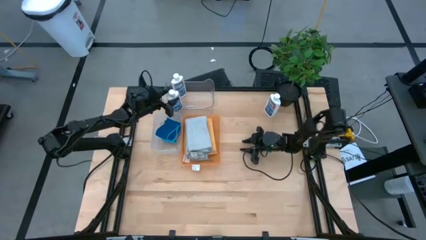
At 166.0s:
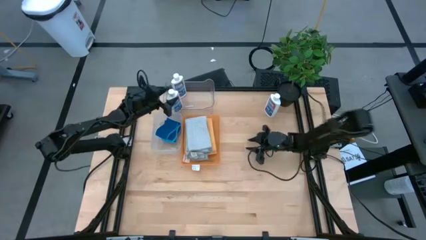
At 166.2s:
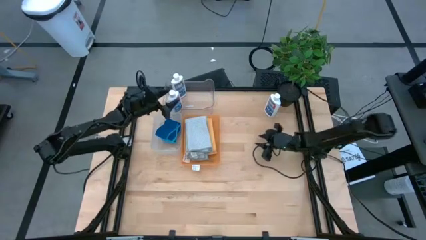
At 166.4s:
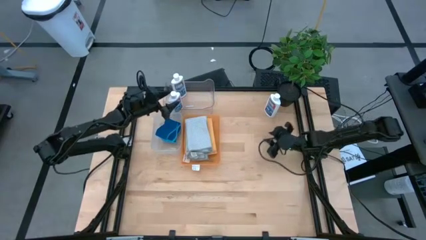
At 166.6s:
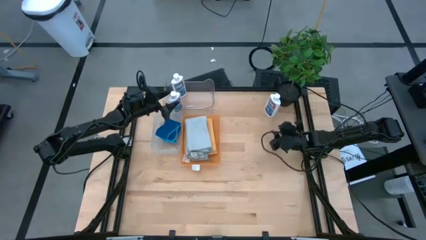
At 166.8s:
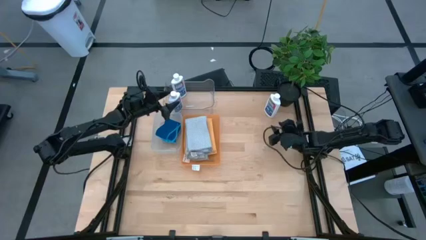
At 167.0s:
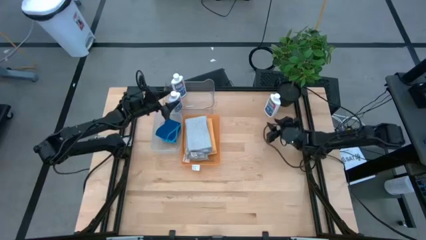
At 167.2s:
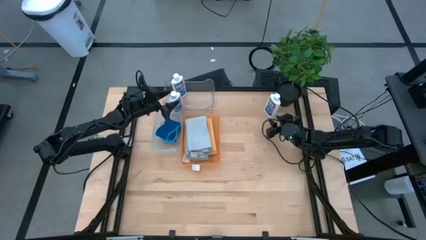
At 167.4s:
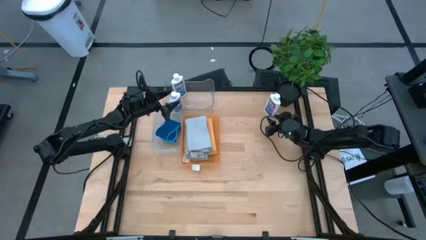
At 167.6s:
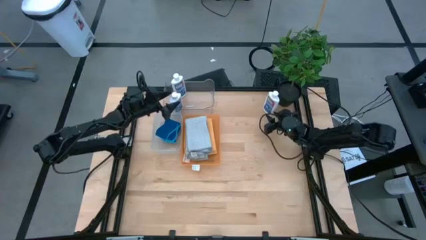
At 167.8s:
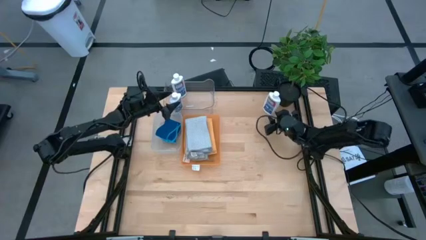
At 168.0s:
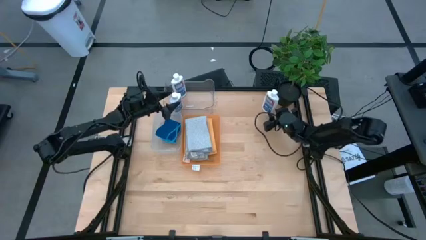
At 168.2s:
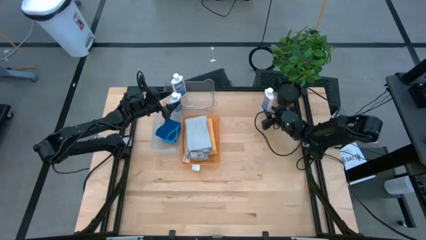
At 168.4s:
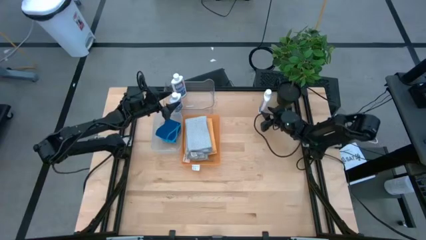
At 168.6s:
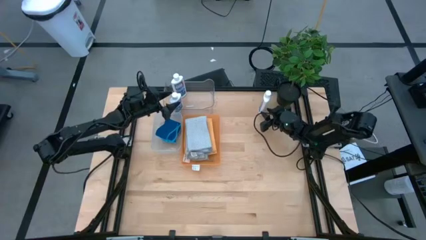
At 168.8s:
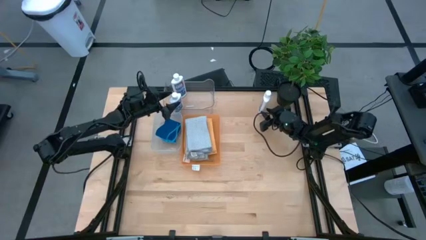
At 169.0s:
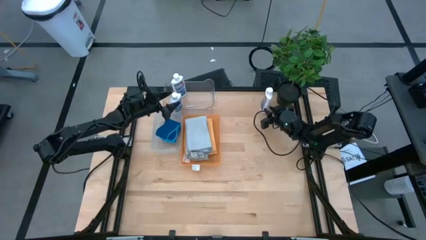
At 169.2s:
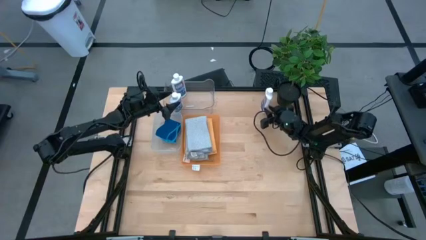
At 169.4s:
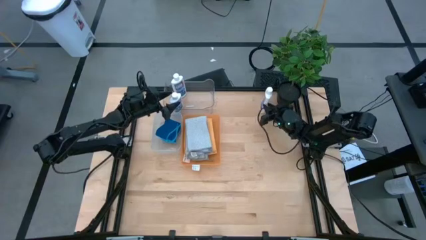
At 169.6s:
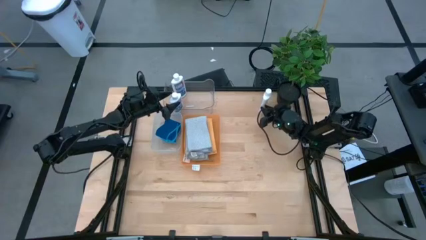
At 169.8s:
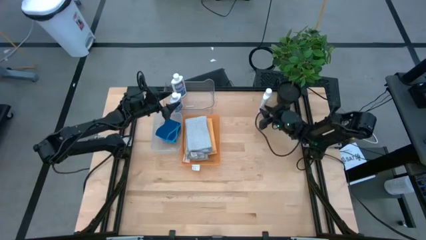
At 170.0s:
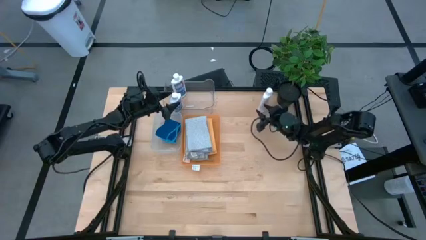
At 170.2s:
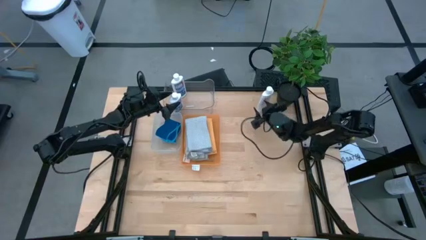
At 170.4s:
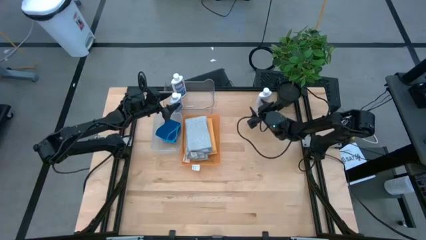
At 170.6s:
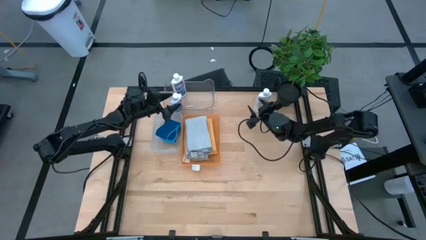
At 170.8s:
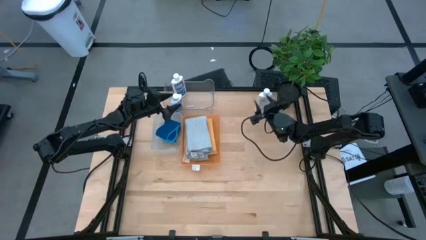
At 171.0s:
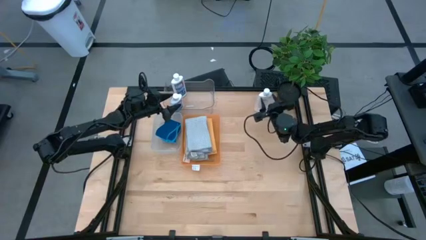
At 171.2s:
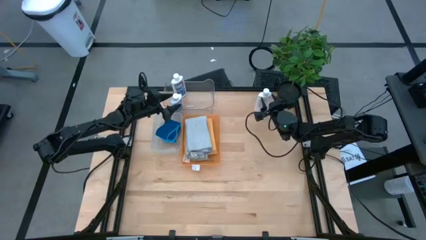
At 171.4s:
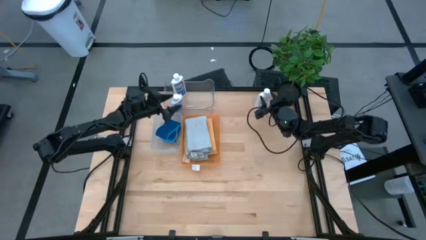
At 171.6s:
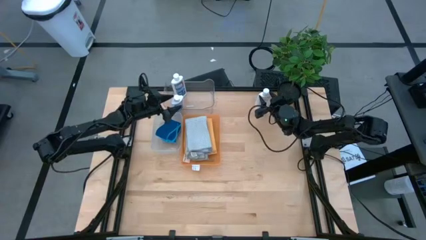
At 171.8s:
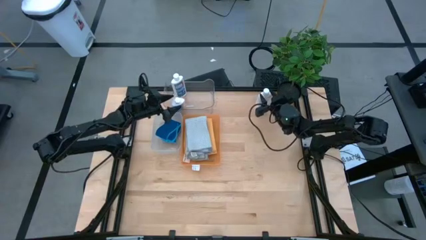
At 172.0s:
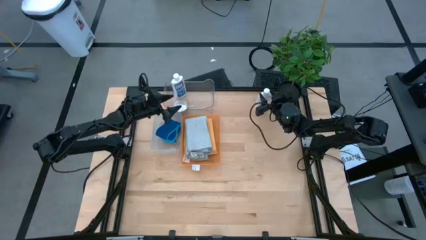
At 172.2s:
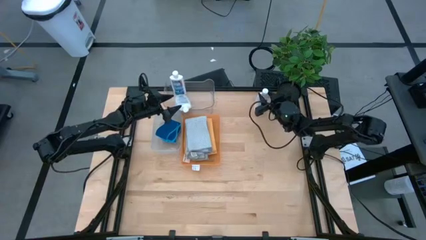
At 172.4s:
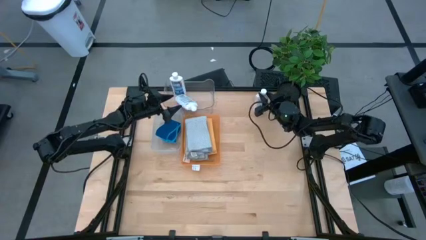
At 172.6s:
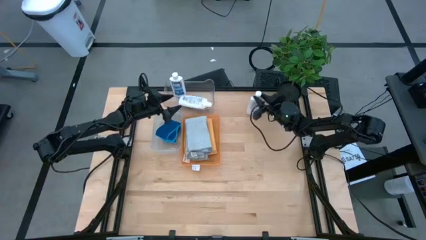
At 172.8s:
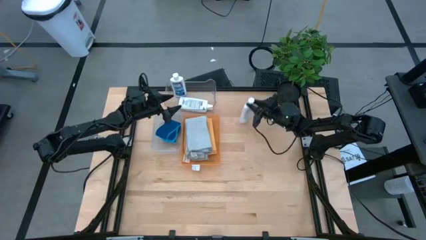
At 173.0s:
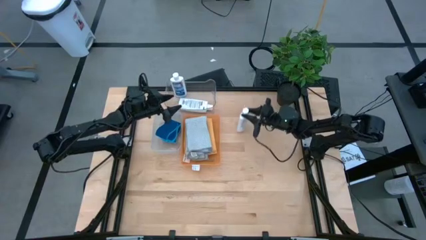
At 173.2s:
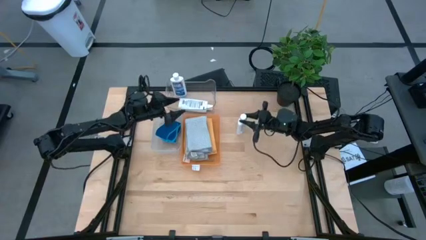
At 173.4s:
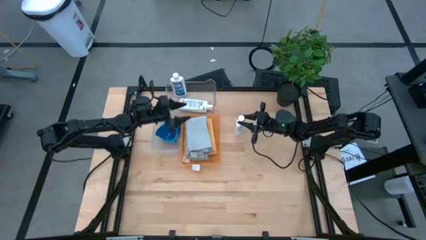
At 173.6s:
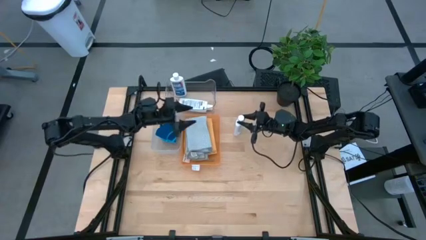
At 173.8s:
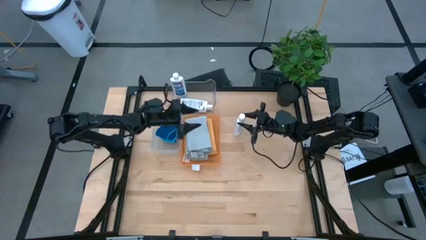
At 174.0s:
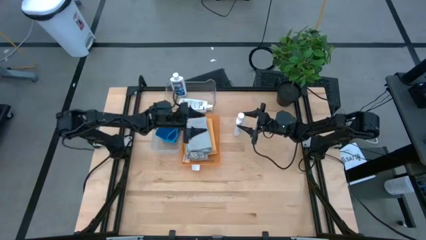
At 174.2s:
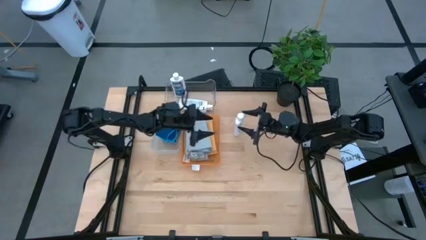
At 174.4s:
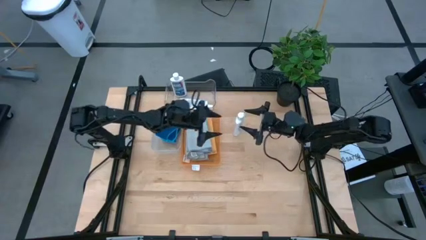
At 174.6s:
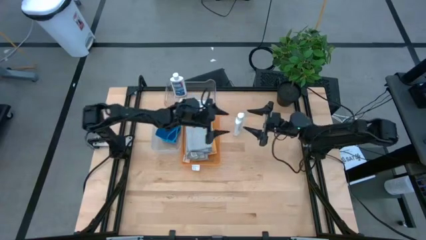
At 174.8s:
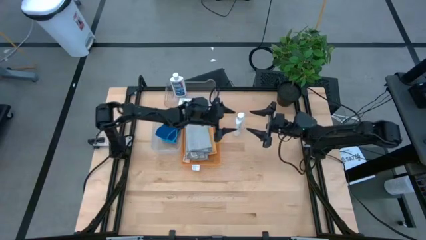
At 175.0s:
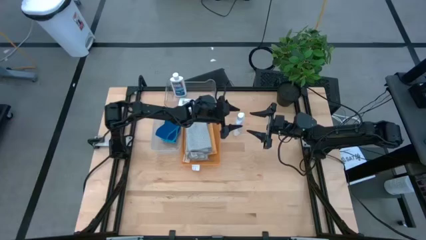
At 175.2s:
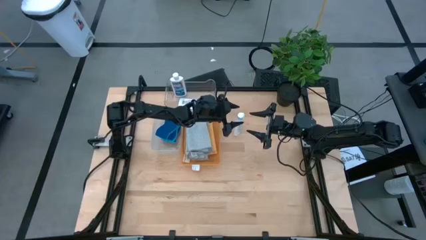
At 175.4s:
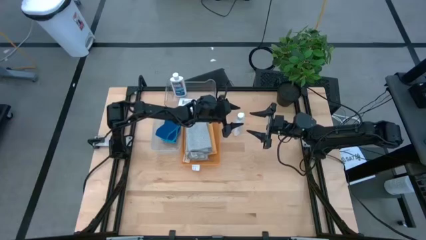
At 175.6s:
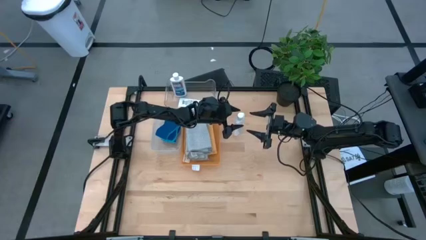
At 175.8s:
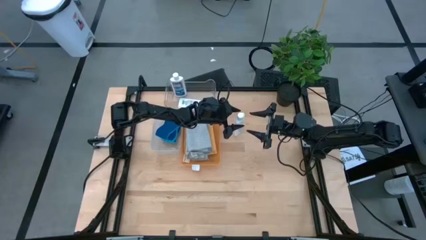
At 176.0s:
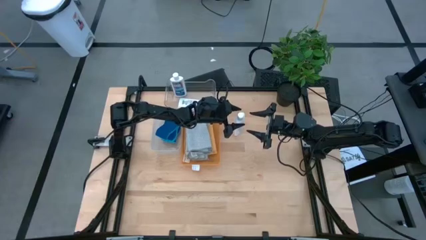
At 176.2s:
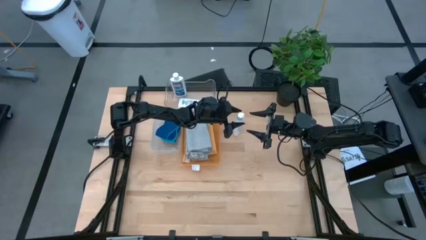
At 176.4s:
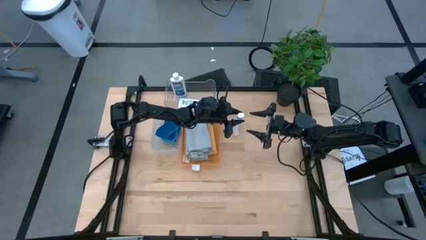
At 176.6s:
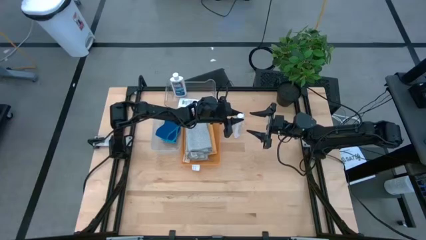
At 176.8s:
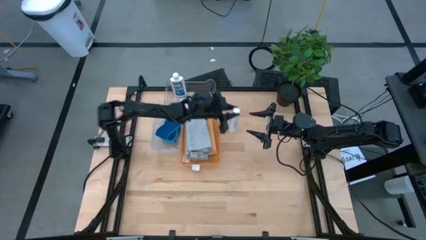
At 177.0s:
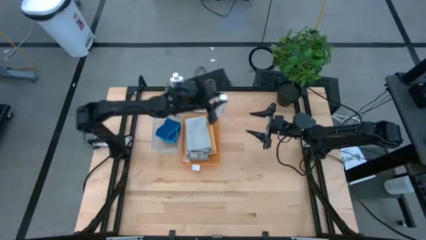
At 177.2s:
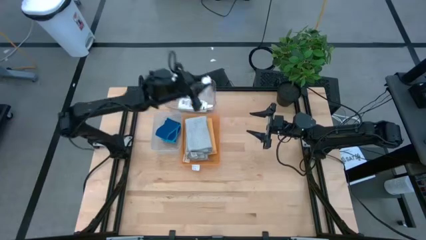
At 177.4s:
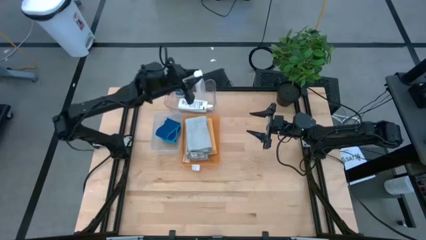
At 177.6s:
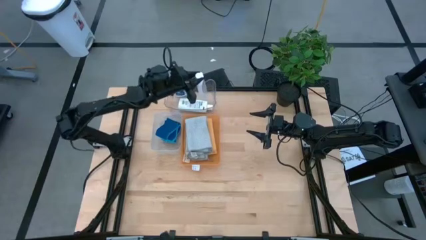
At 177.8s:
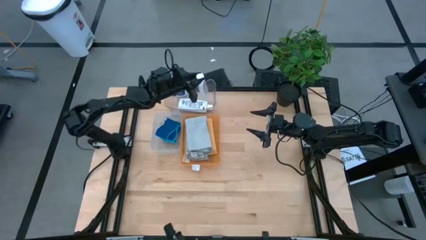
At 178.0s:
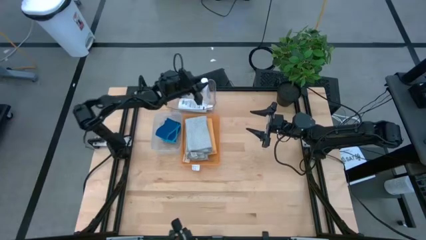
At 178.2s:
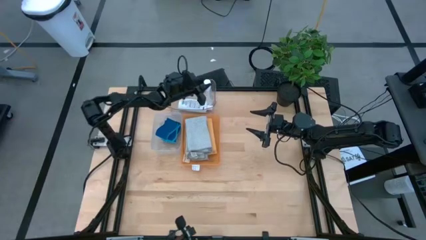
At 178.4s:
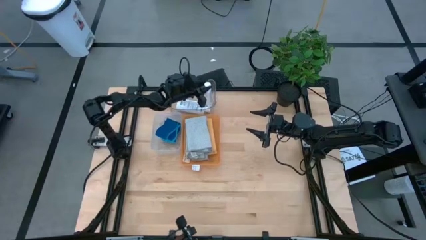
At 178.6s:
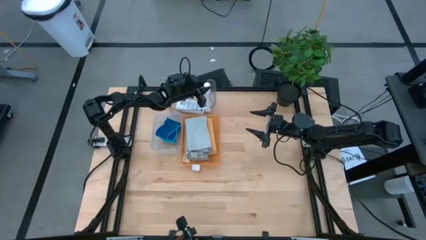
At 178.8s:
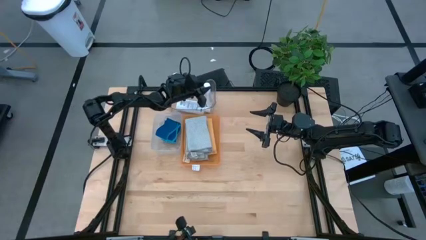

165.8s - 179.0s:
Task: Pick & Place Kitchen Items
Put the plastic restorer bottle into the transparent bin
